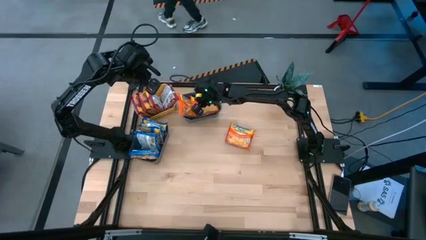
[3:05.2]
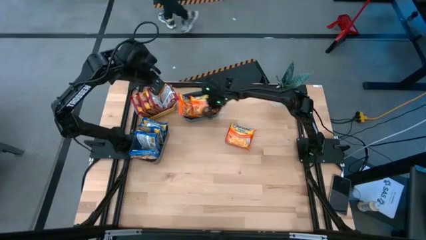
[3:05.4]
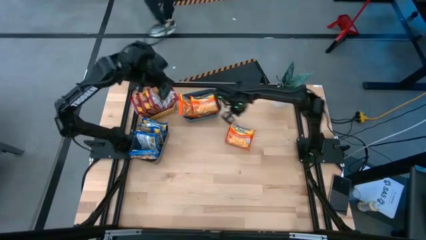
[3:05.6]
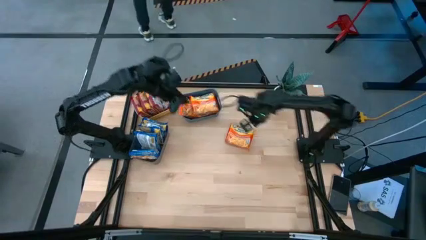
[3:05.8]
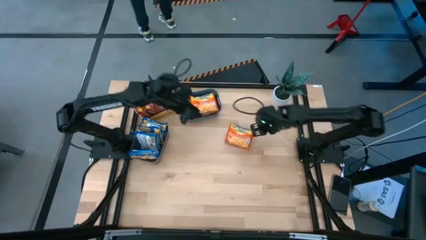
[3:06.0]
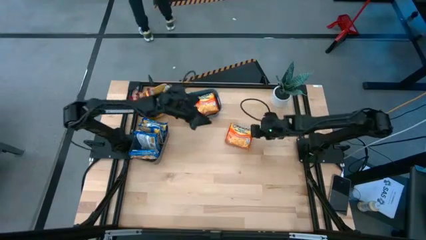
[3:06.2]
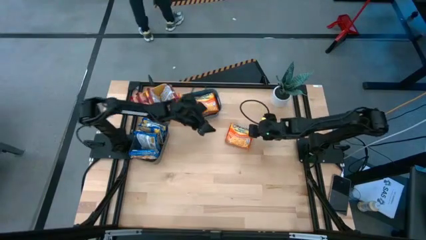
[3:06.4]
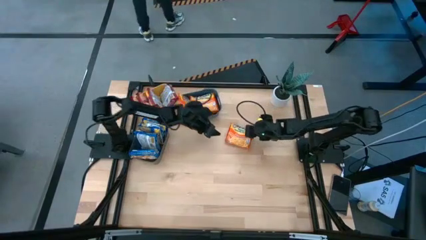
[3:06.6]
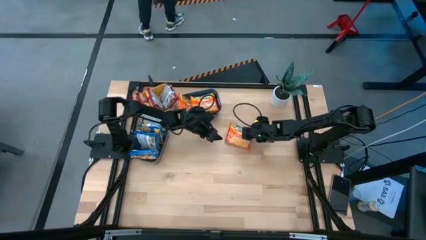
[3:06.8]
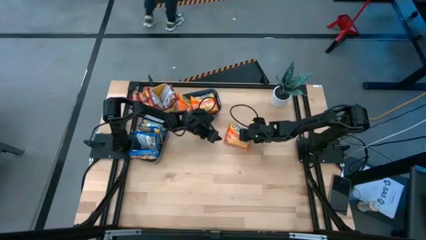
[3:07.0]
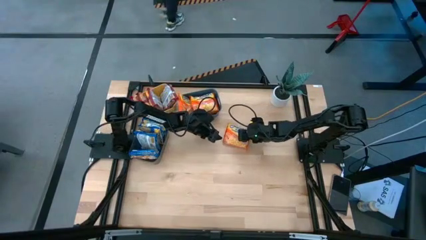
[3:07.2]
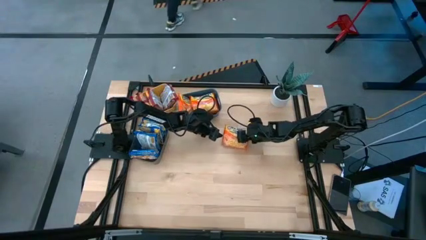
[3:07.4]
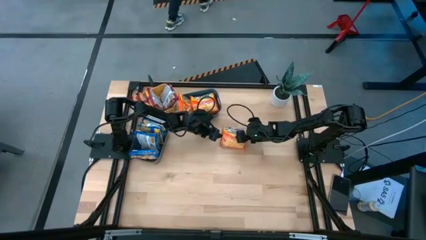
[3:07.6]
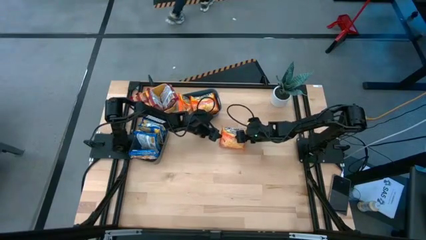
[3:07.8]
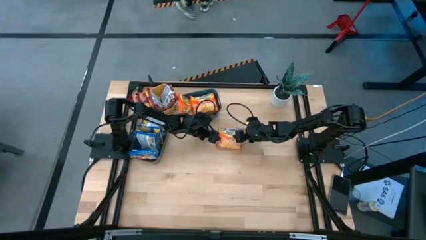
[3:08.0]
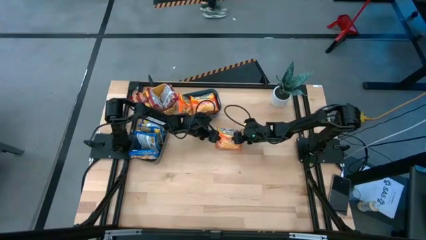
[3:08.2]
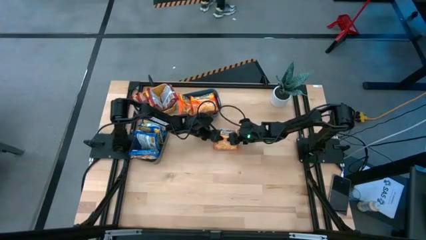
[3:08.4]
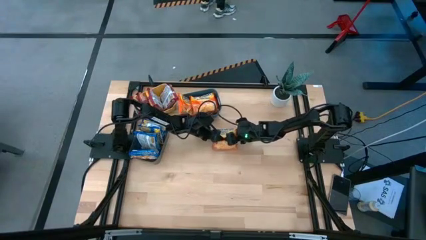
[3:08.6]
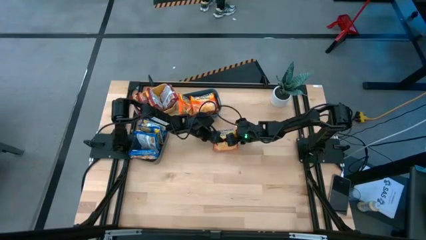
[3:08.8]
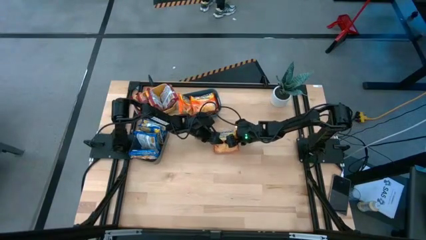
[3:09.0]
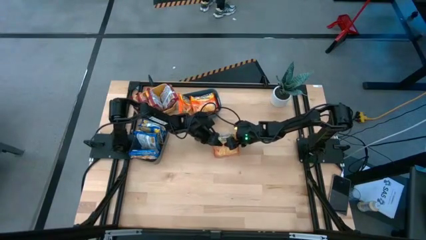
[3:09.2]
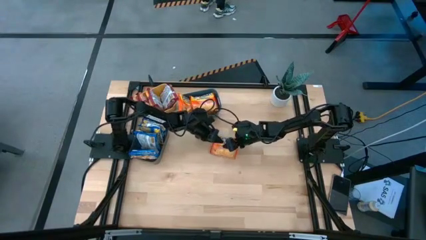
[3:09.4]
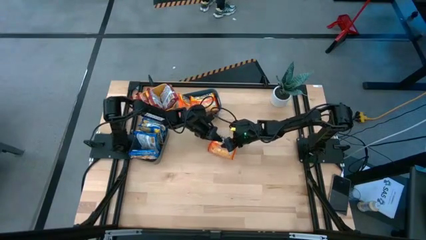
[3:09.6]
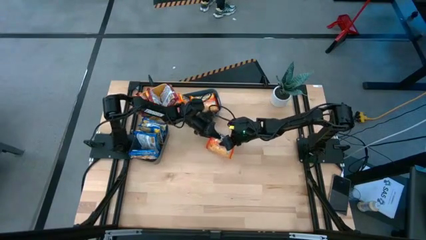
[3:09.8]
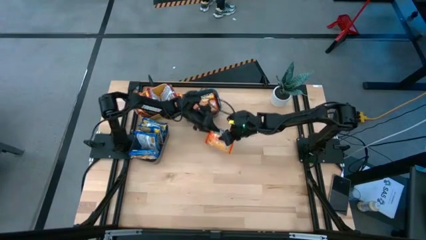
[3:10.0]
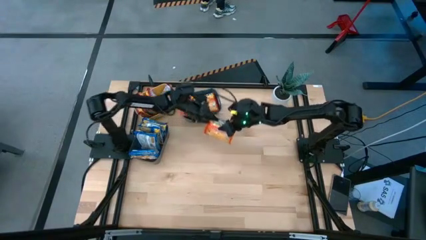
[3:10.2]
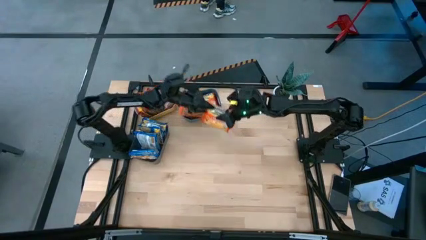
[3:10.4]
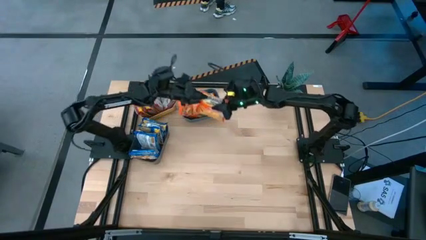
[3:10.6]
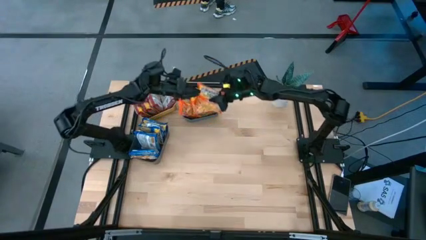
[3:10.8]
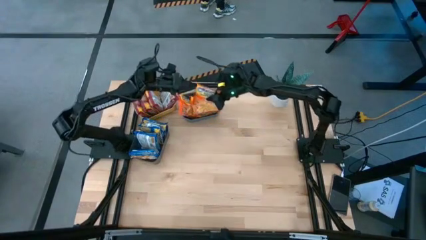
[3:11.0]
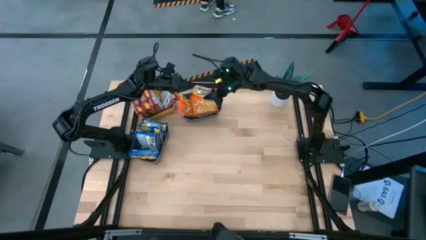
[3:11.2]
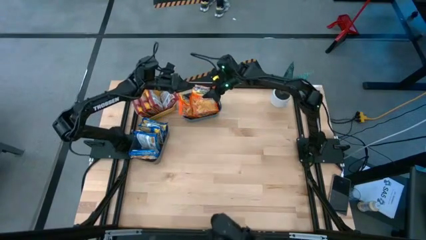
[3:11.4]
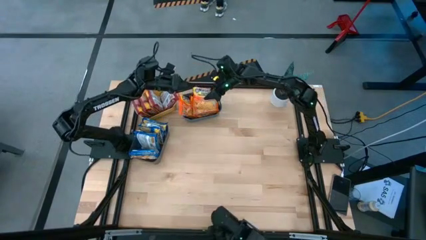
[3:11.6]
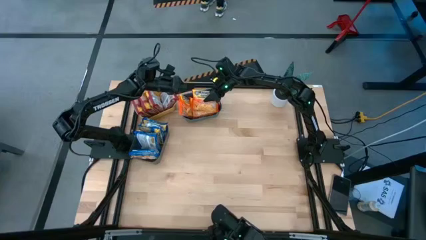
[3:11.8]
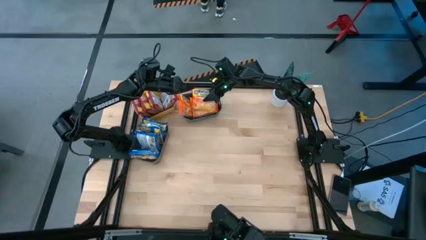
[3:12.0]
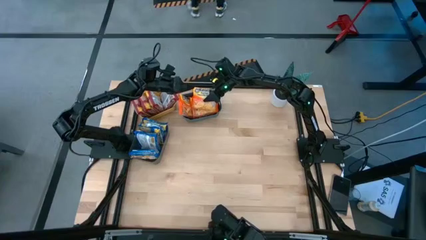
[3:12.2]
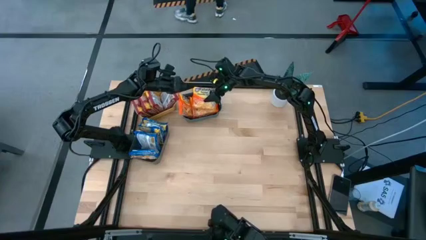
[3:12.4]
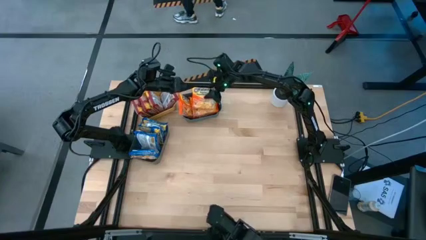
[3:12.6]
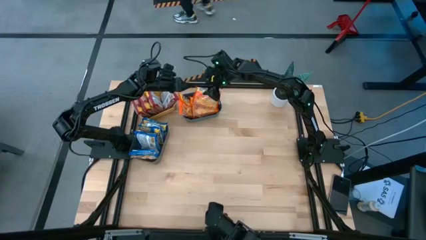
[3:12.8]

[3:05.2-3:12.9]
Task: Sort Maruchan noodles
Put the orange noodle pack into the blue bin

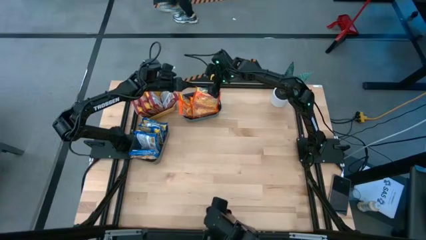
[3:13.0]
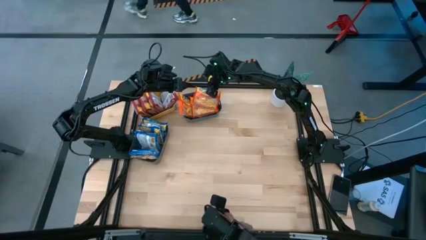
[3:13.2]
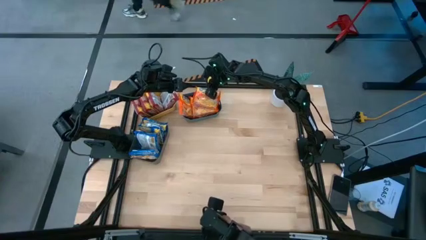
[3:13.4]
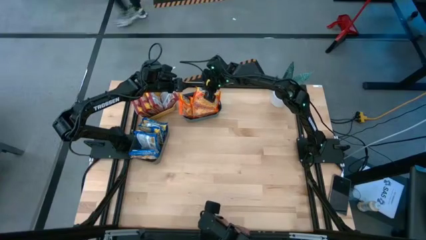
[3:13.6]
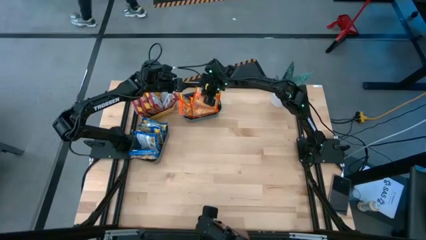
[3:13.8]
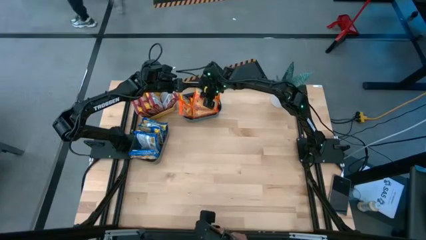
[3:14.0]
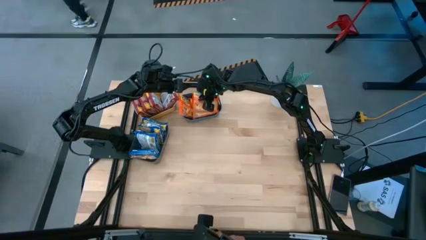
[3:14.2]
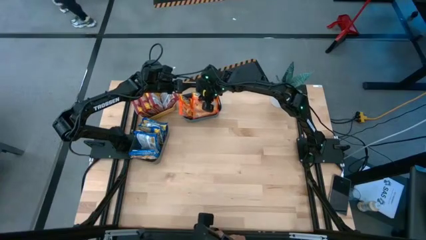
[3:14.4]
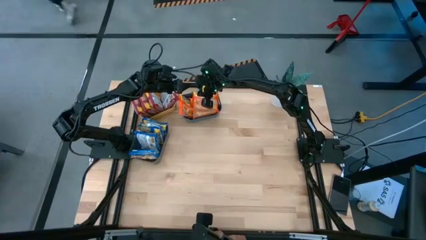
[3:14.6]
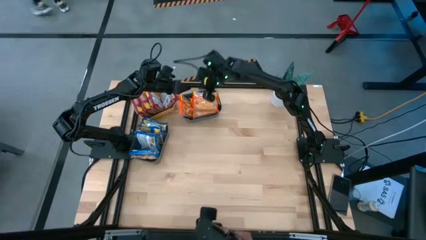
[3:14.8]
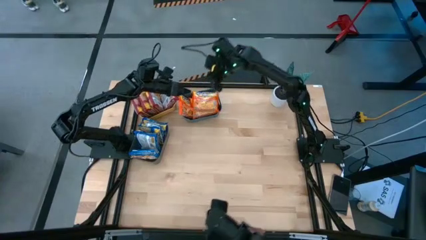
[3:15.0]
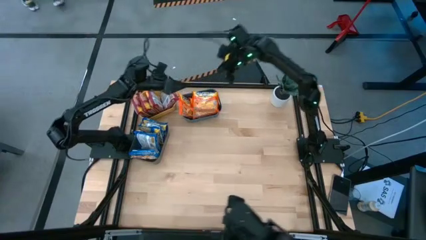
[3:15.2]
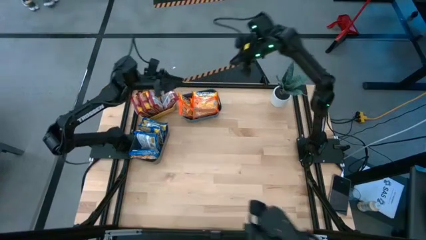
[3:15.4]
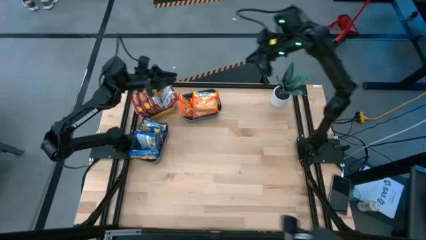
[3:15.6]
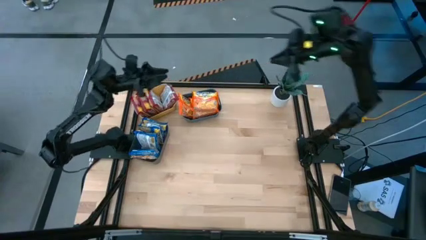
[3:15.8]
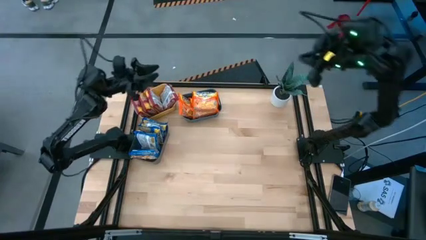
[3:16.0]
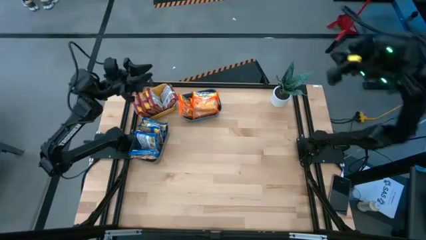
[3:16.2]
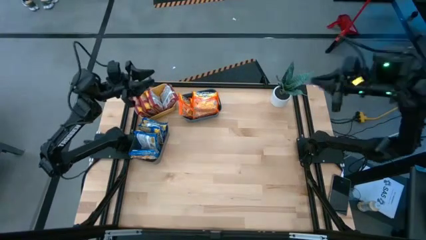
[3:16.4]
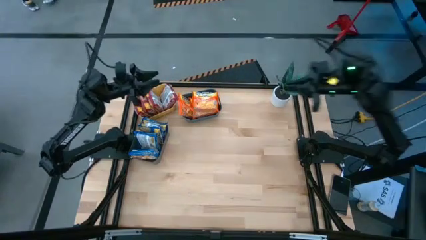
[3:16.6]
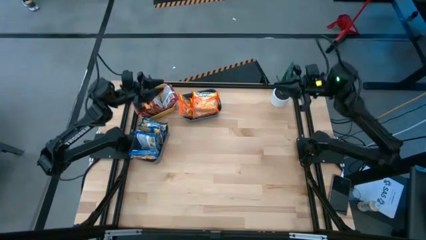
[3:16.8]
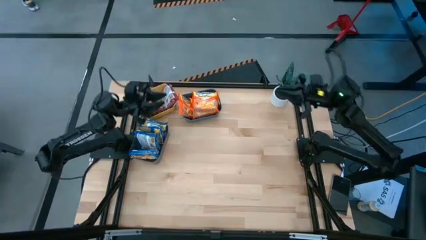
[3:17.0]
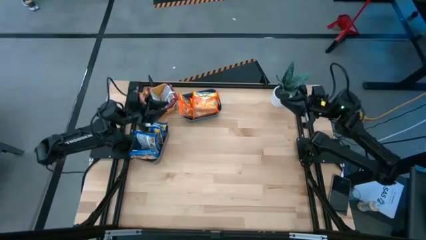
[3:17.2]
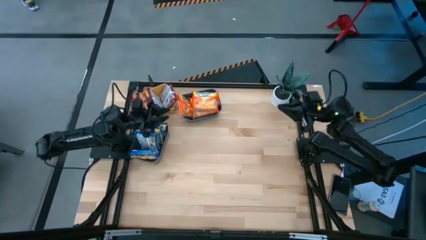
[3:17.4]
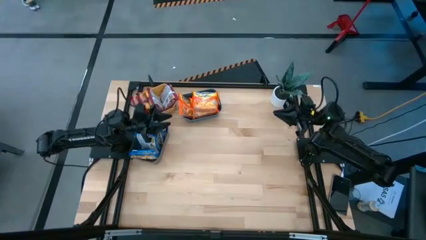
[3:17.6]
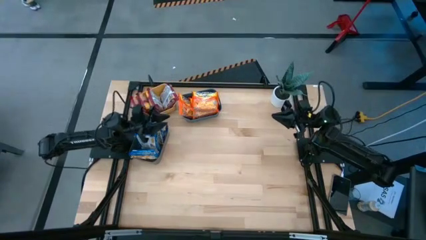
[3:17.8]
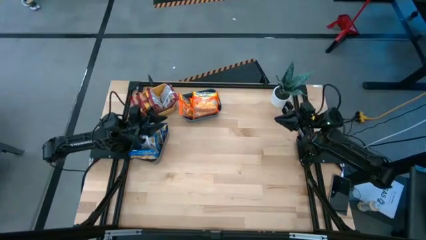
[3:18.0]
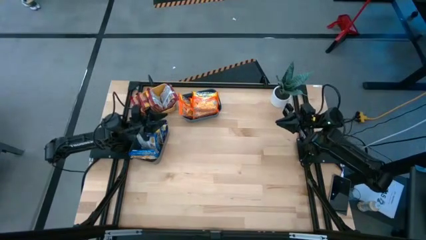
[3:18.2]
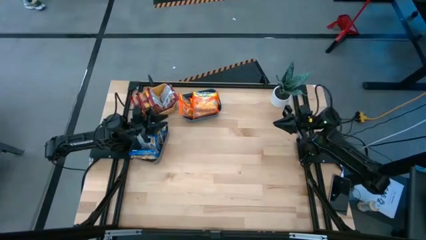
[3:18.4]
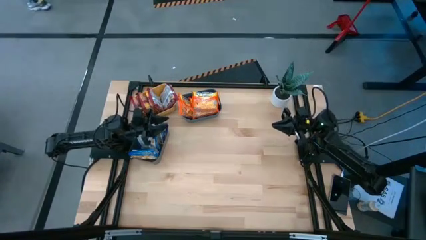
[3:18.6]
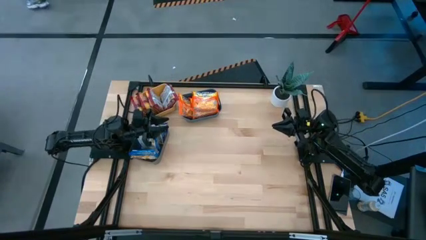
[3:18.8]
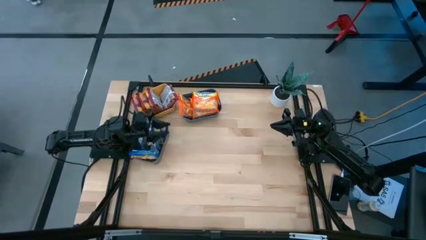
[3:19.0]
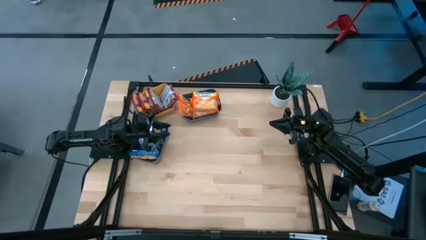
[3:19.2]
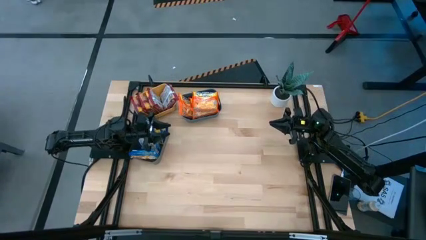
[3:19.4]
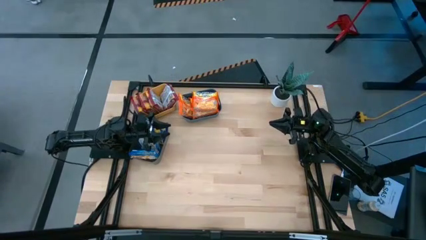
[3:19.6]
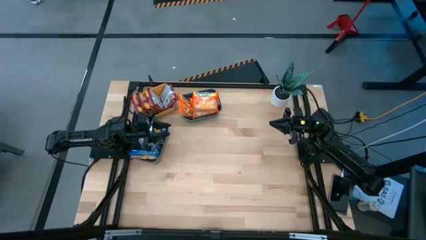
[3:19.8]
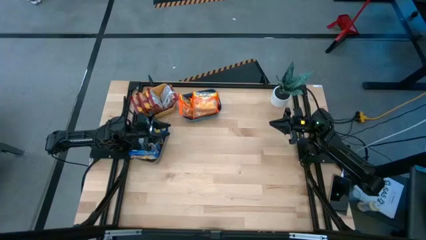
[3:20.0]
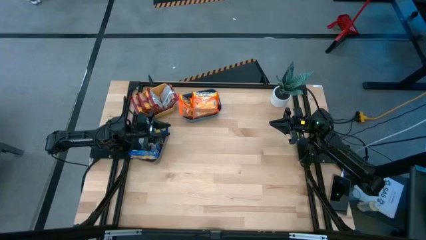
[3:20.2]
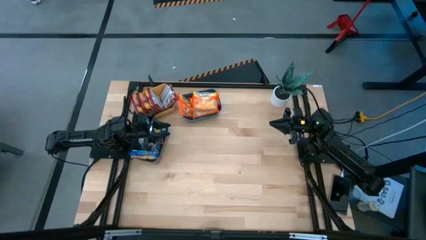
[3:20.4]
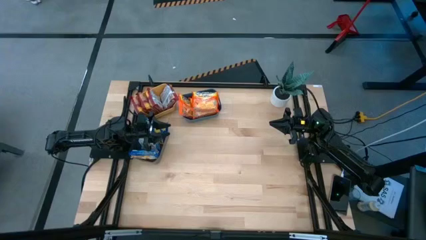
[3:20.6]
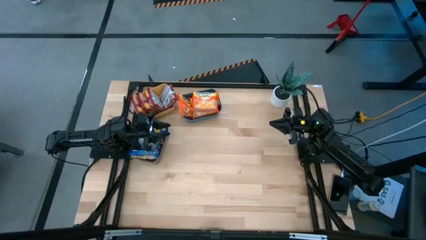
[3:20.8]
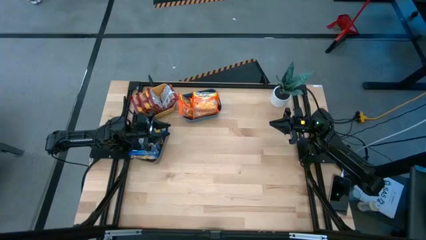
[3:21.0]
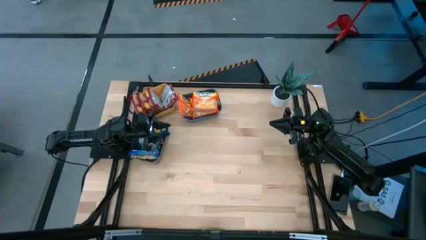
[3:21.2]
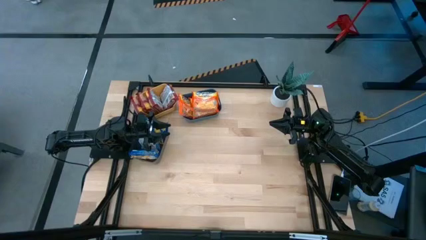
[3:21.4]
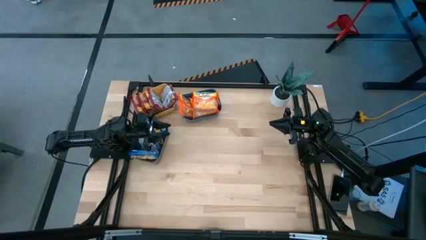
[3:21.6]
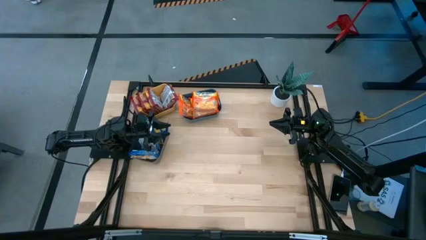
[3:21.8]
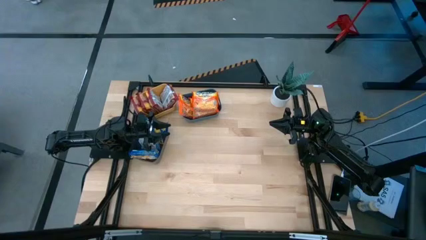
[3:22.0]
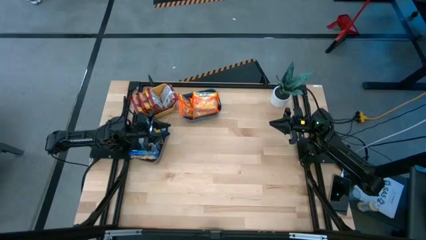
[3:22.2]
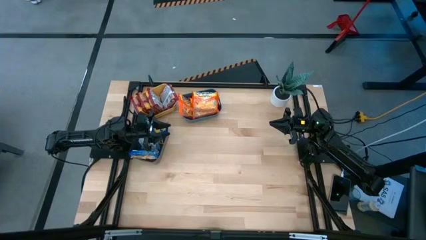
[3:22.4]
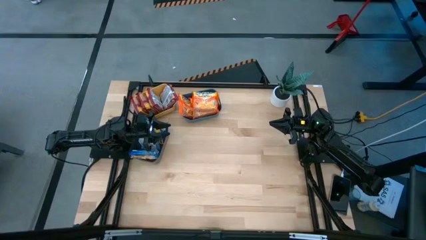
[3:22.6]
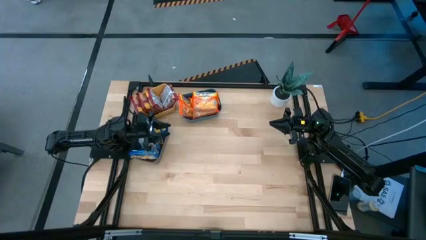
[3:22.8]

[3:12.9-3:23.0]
Return to Home Position
